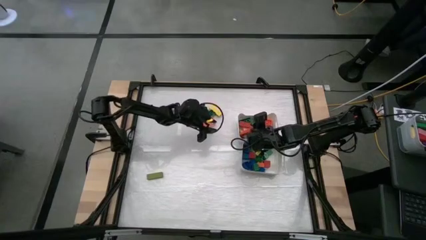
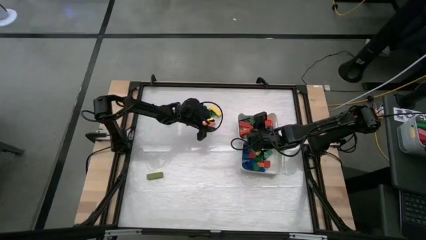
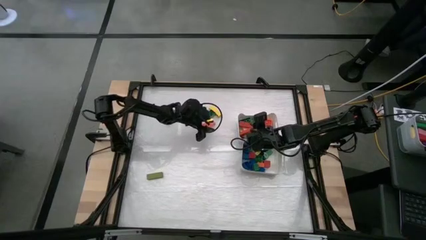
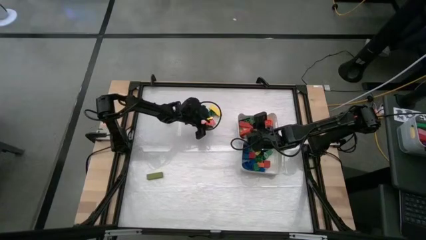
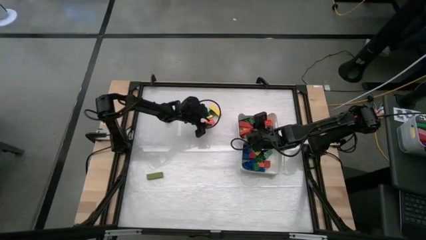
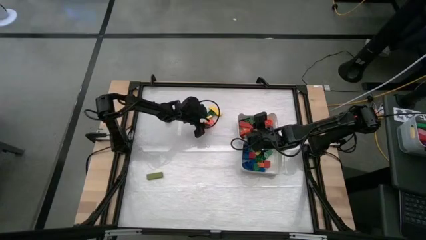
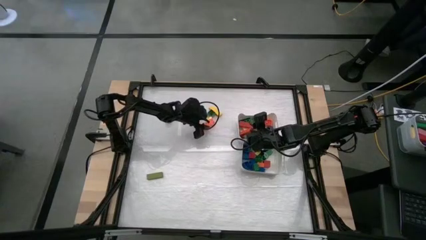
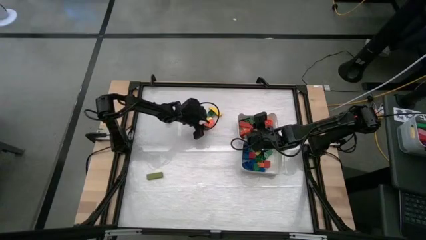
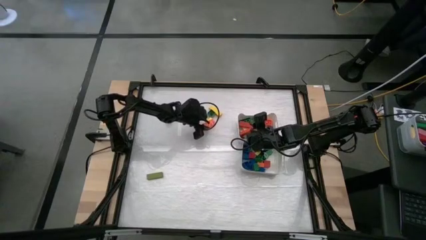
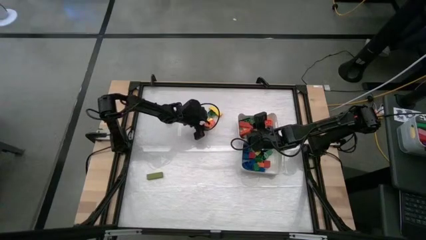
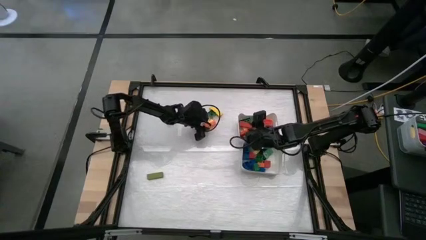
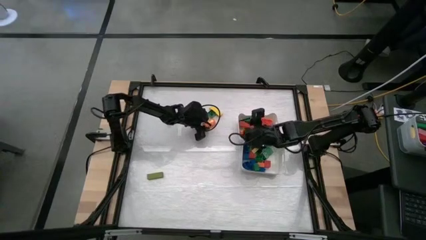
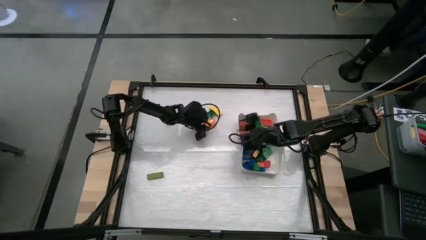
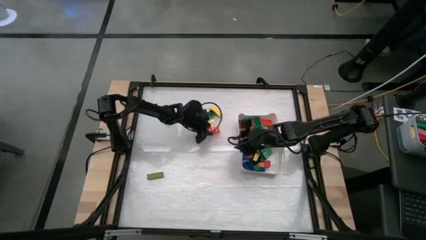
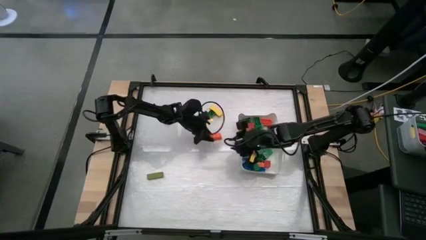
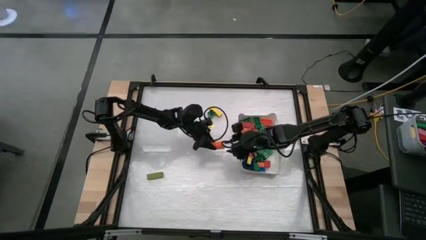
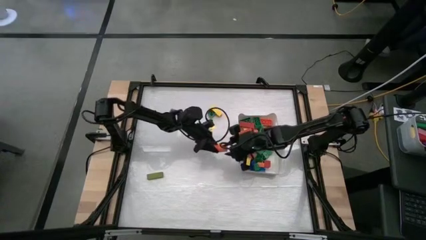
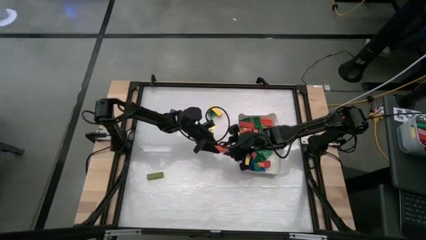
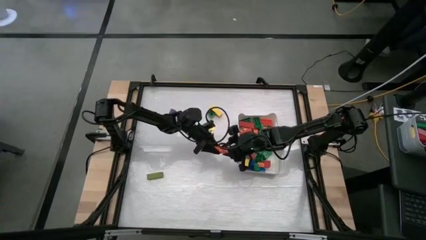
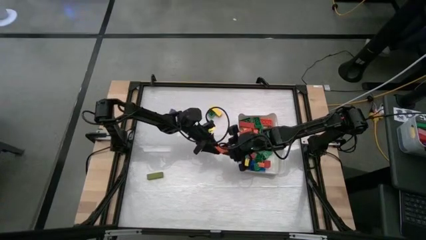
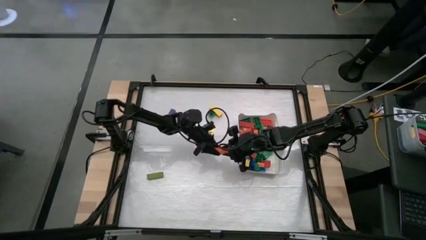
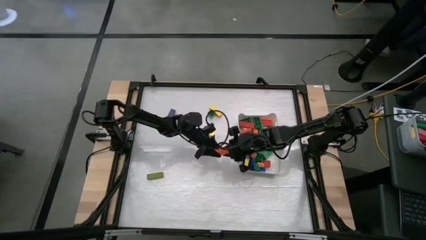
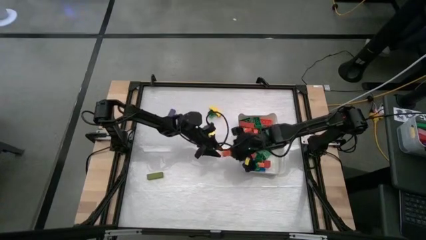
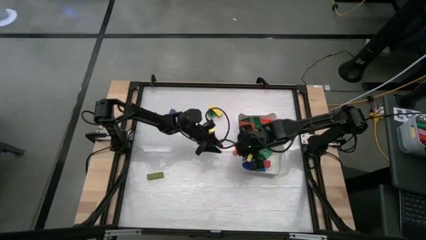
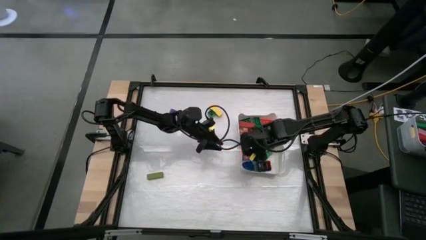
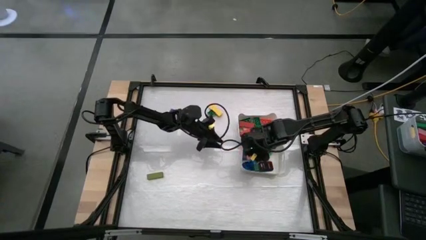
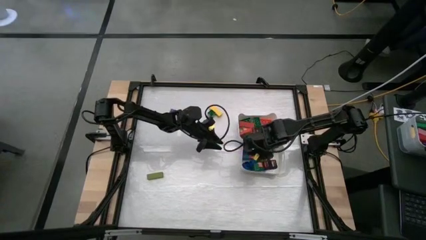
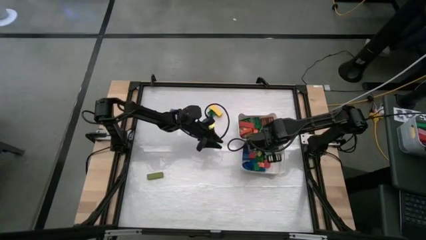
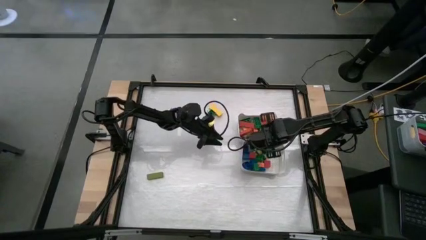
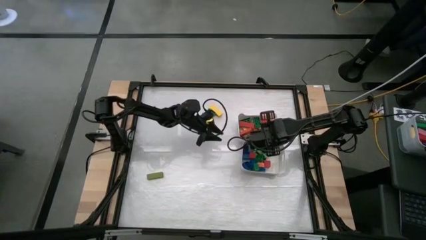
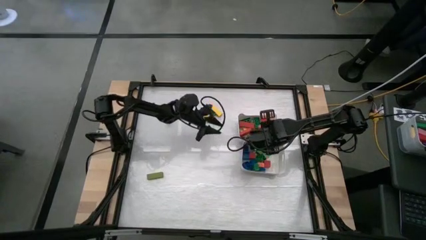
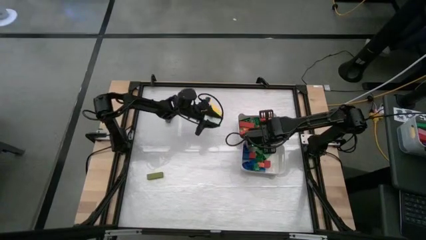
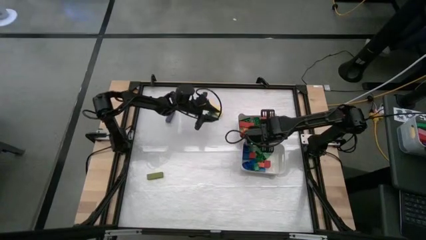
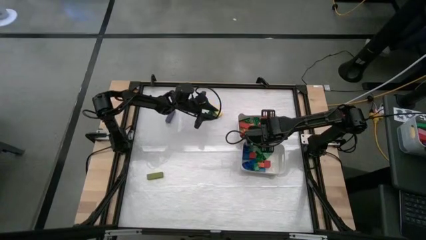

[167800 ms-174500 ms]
Task: Sort blocks by size
Put the red rectangle game piece into the top white bin

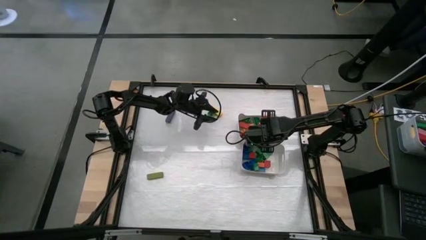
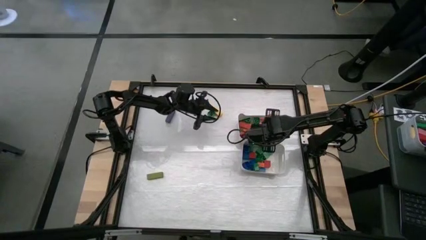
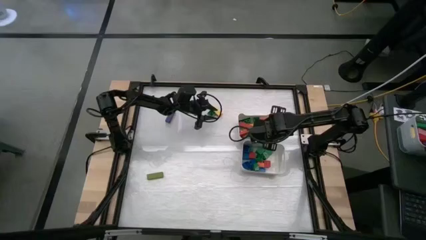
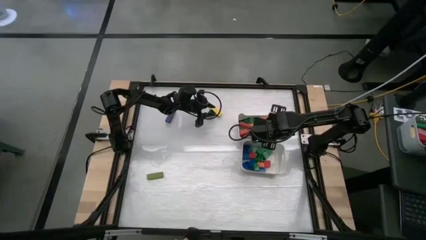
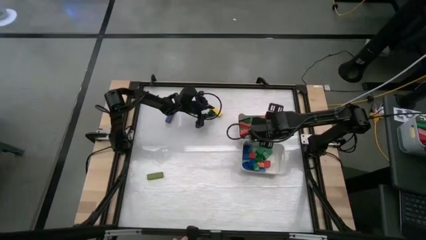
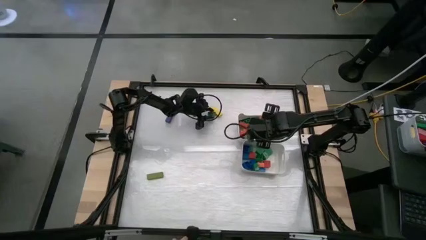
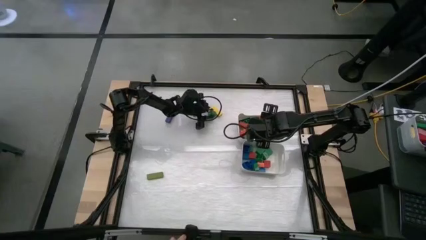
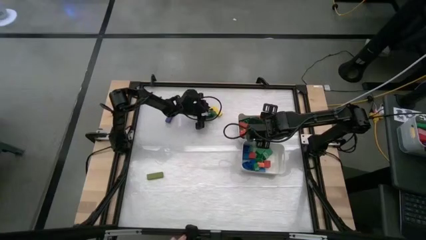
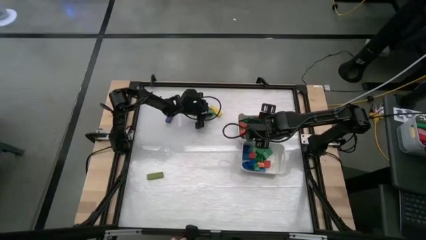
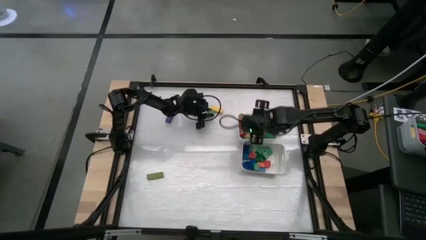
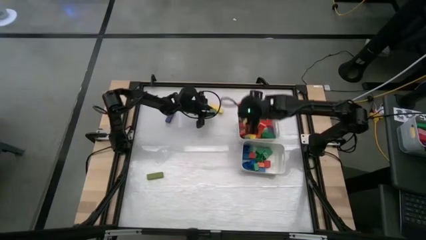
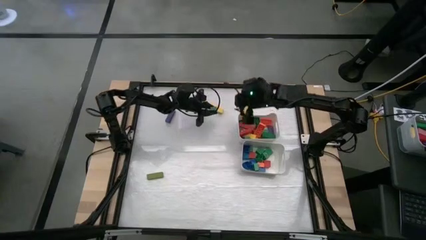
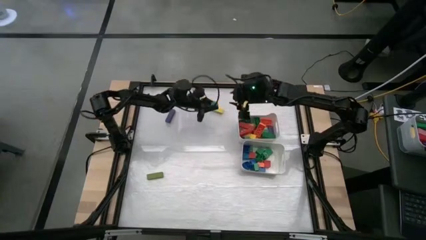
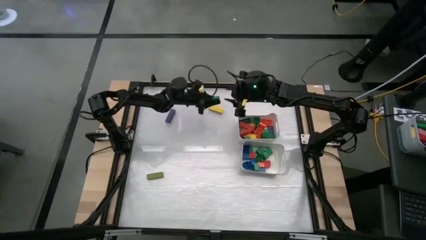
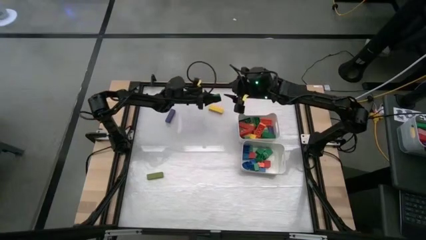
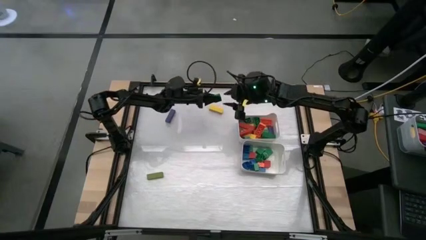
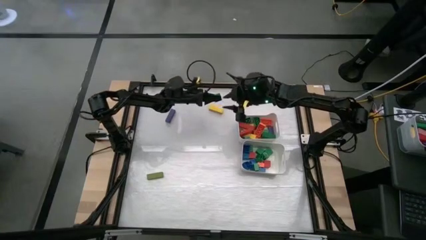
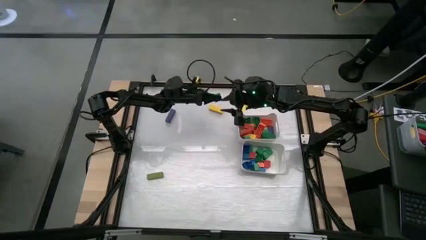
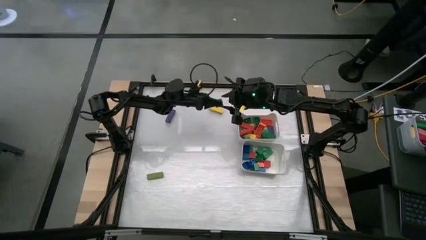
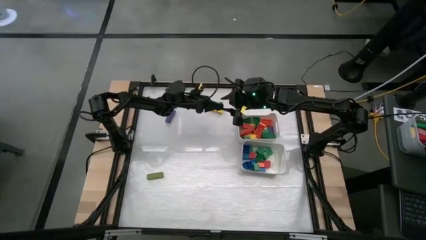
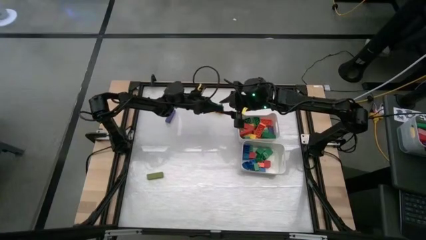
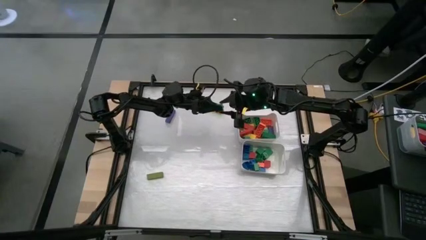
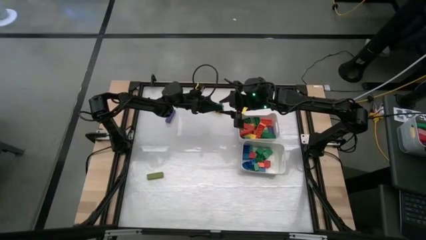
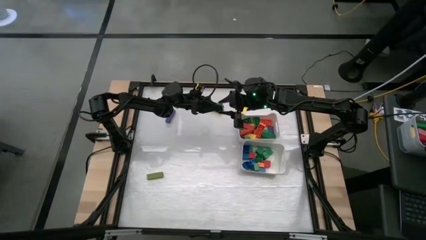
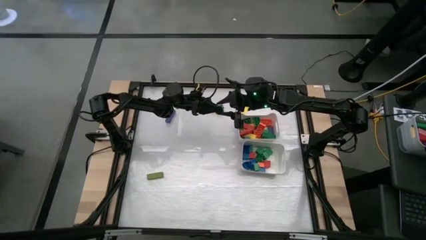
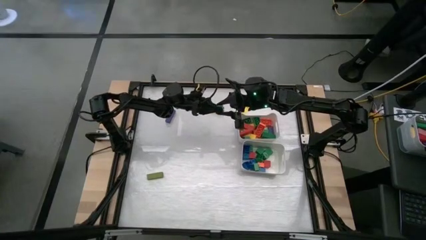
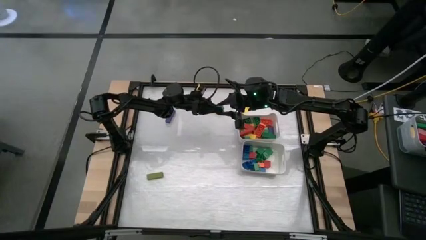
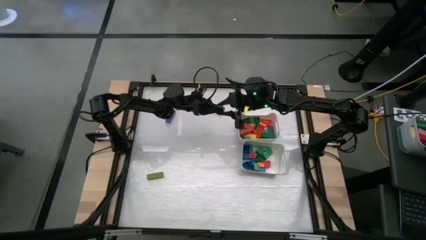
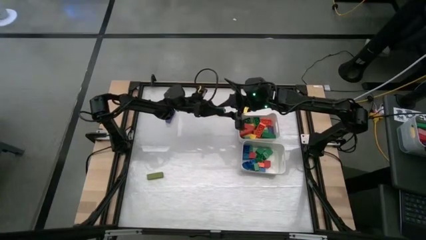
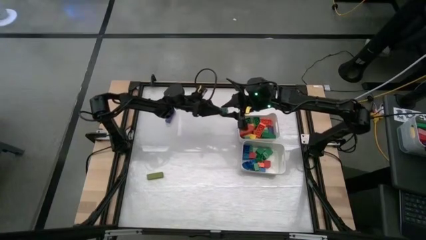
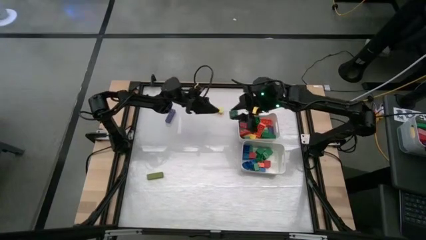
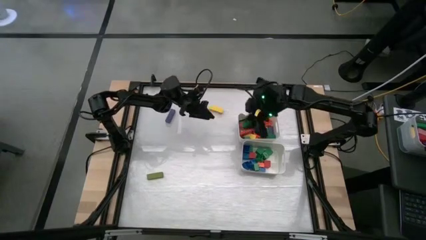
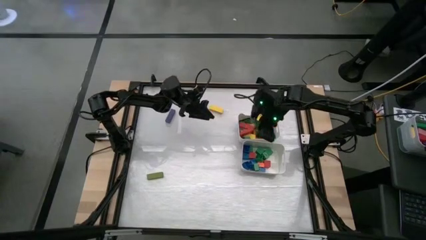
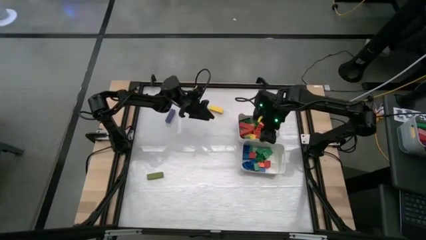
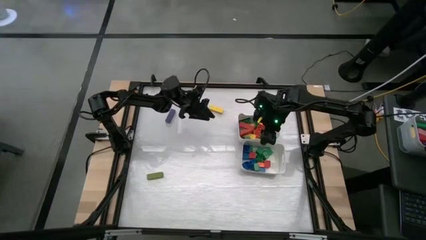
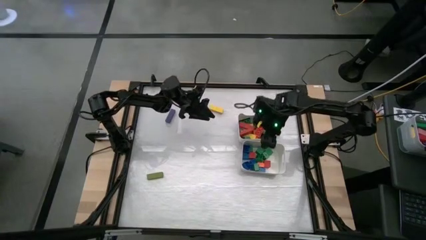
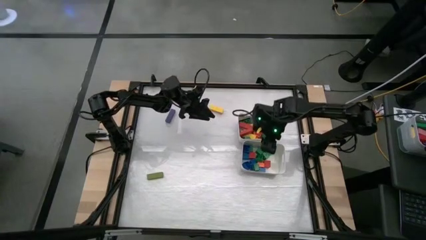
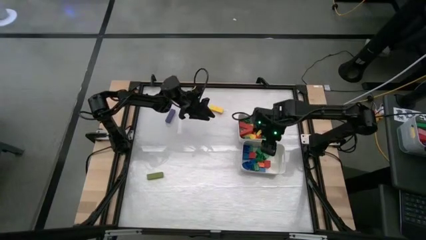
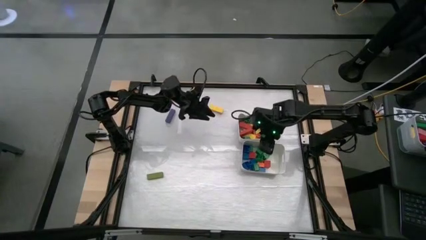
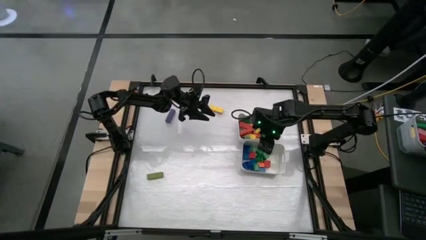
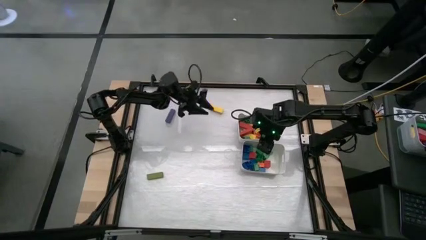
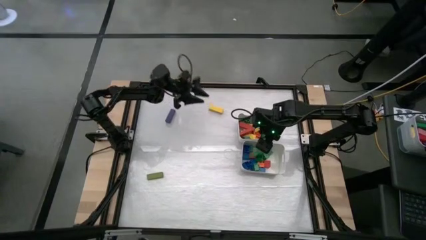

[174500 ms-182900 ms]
Put the green cube game piece into the bottom white bin

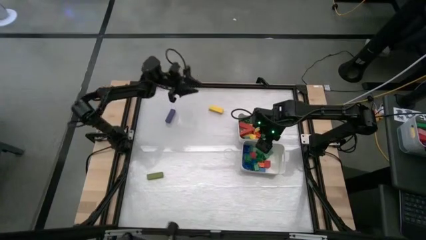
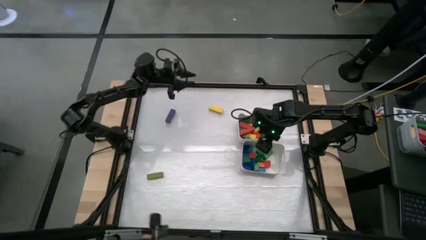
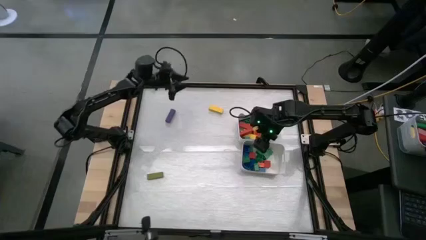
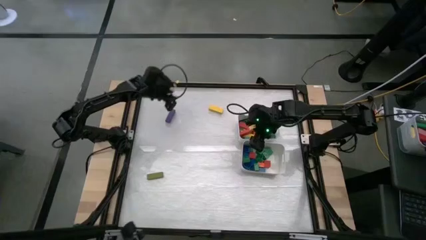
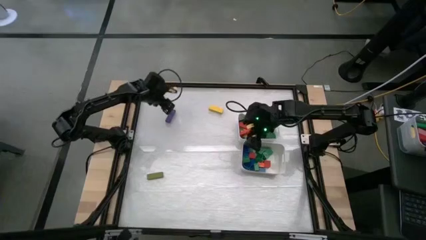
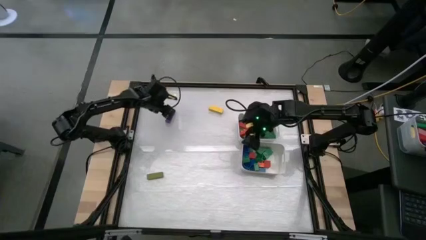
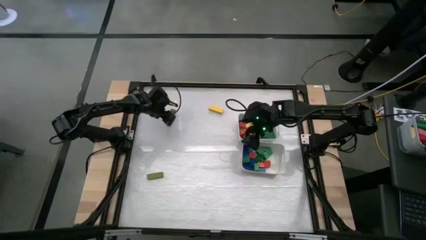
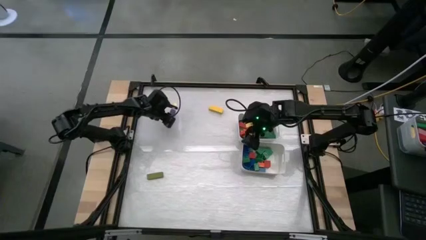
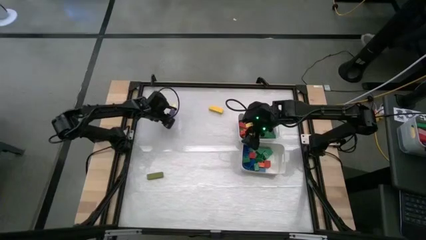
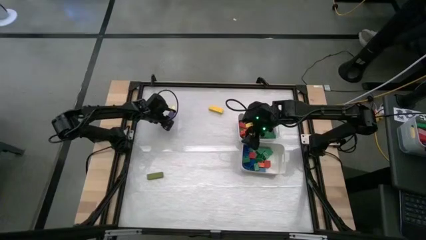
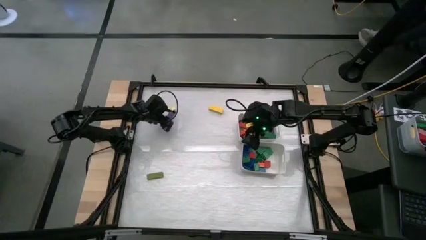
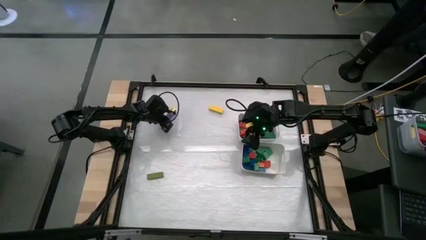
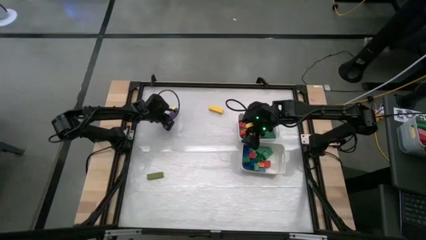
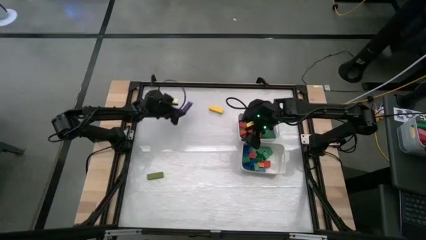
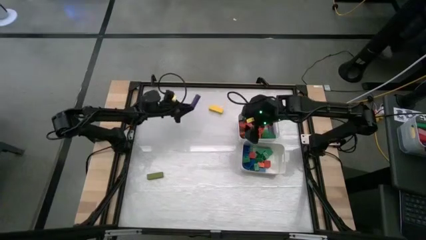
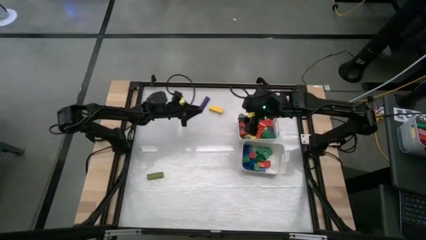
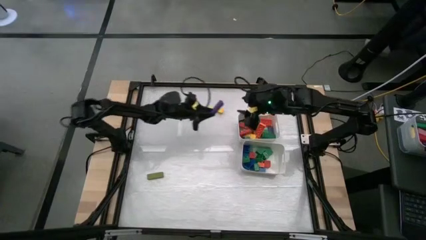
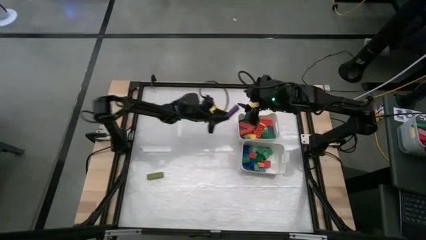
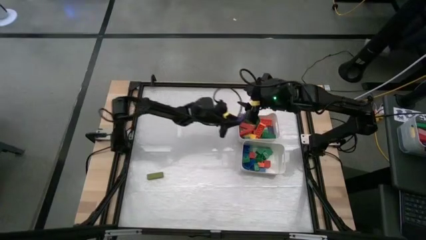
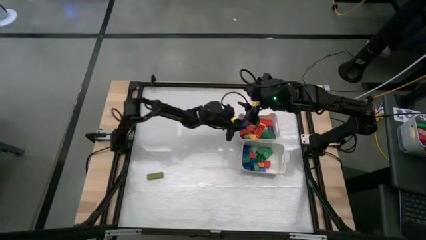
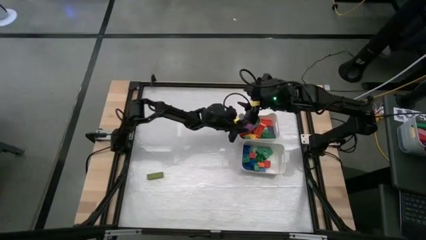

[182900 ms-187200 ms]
Put the violet thin rectangle block into the top white bin
